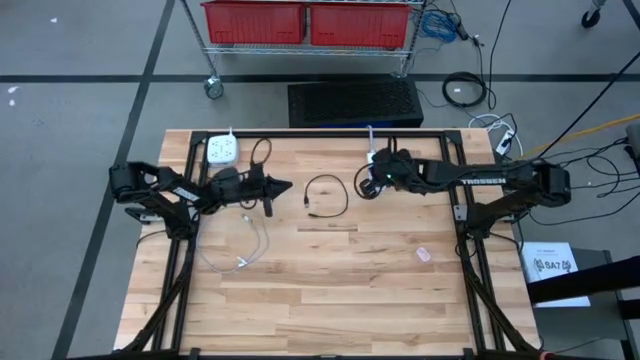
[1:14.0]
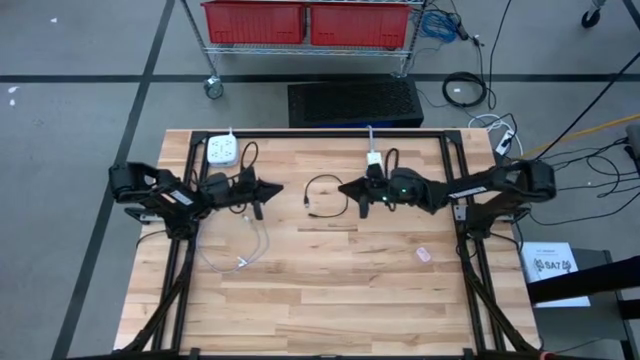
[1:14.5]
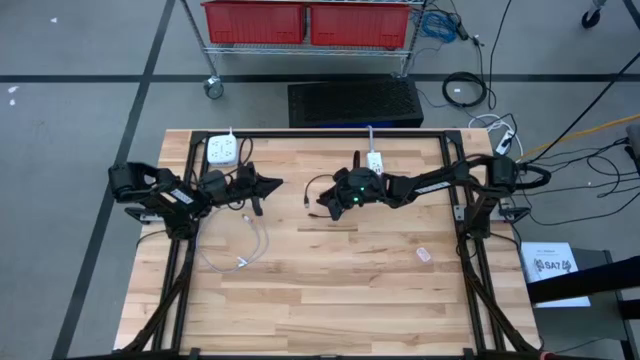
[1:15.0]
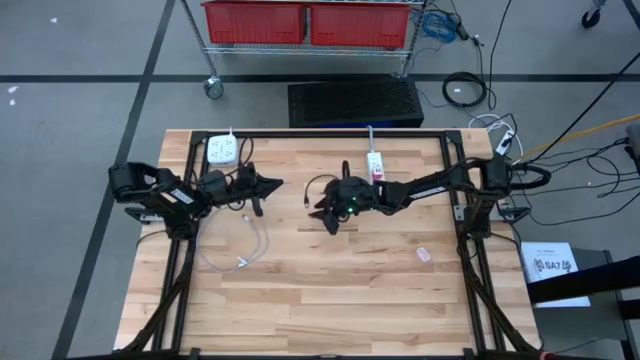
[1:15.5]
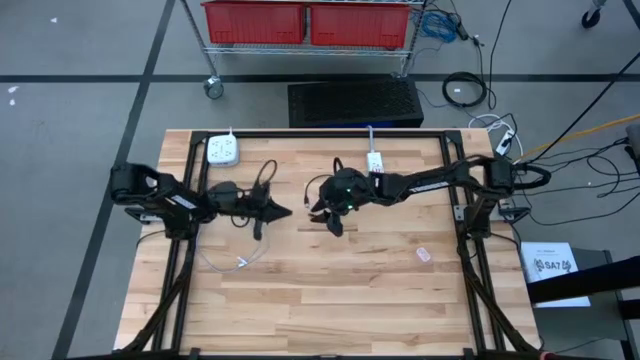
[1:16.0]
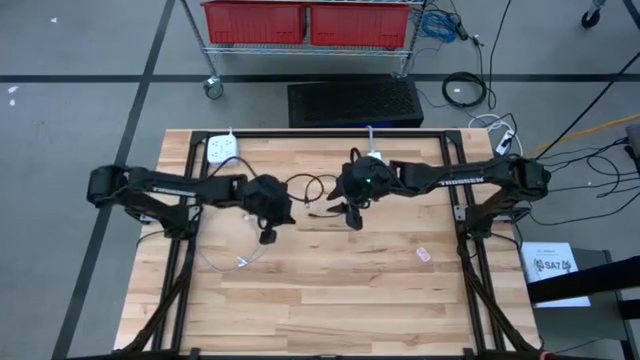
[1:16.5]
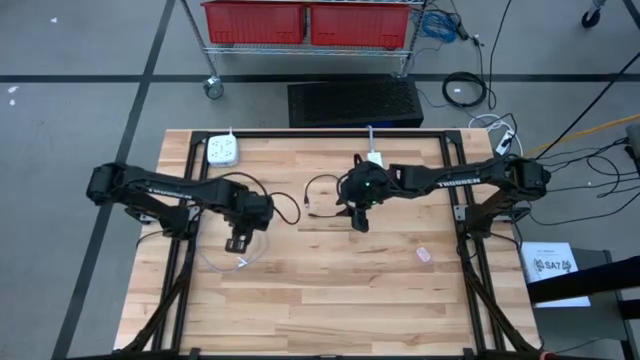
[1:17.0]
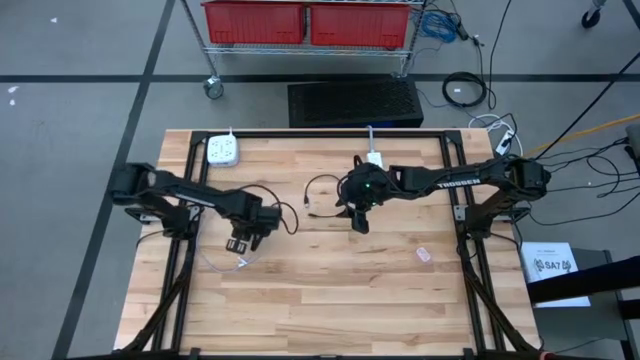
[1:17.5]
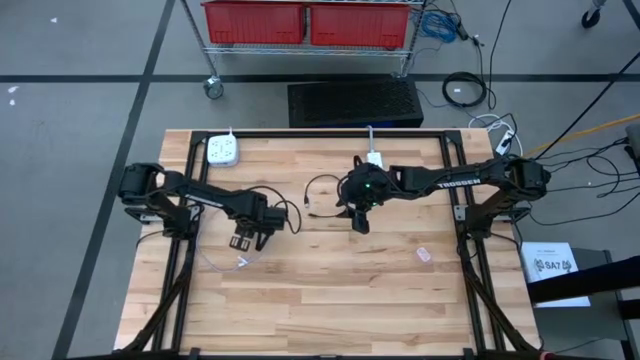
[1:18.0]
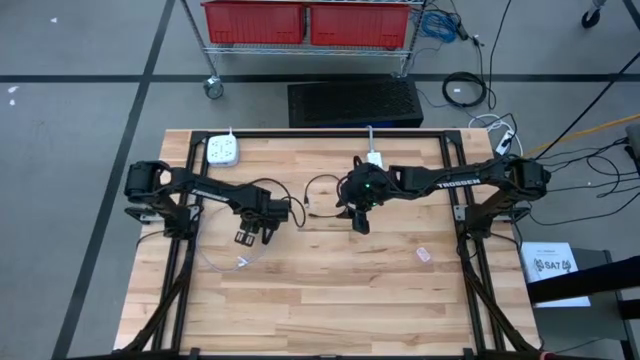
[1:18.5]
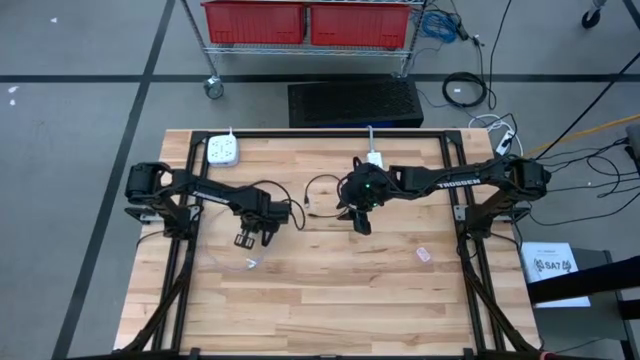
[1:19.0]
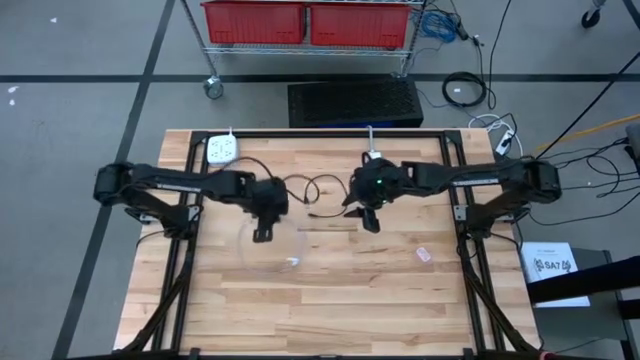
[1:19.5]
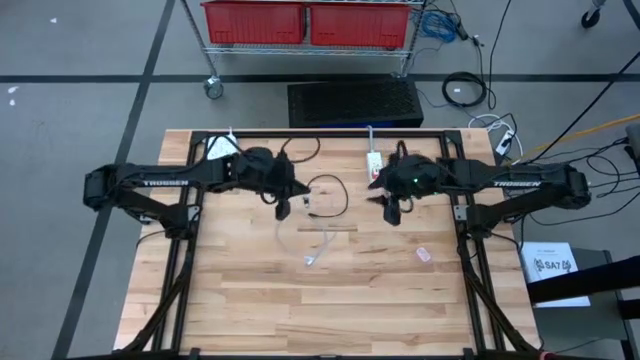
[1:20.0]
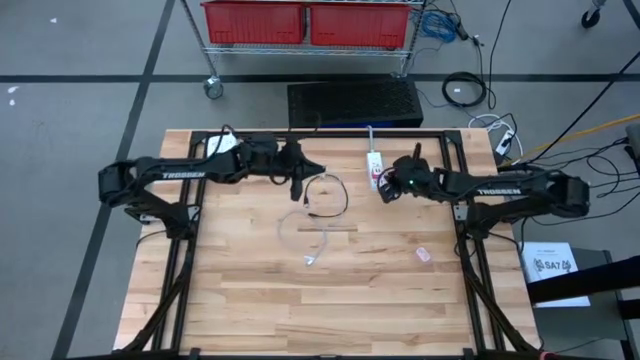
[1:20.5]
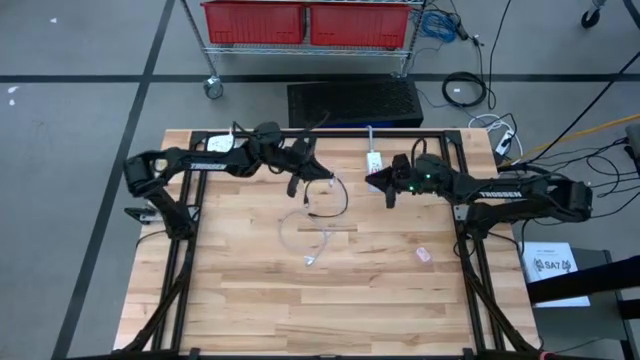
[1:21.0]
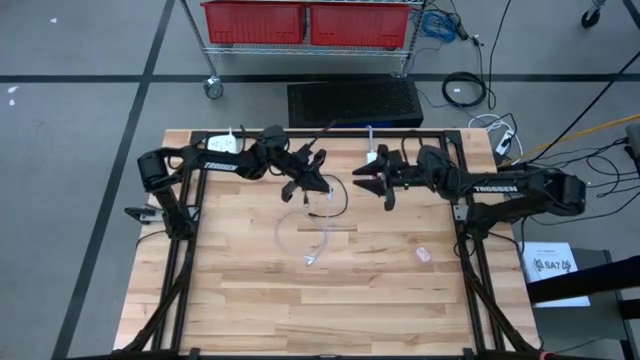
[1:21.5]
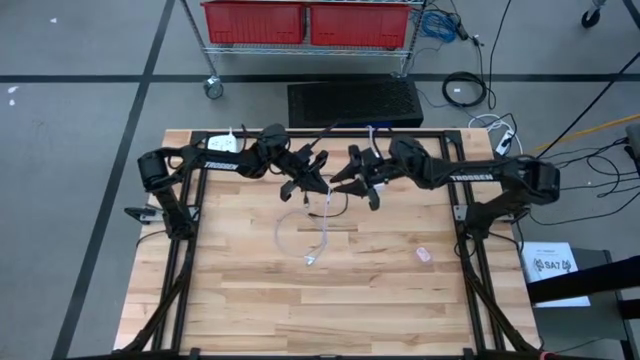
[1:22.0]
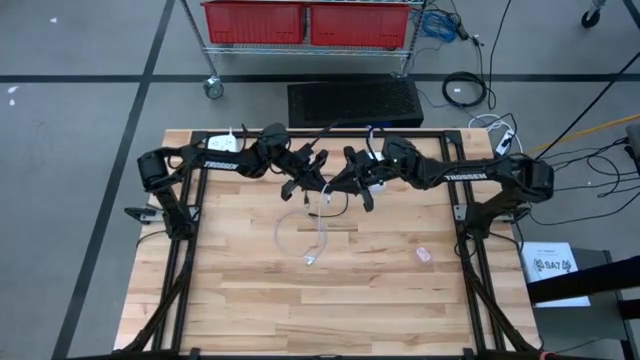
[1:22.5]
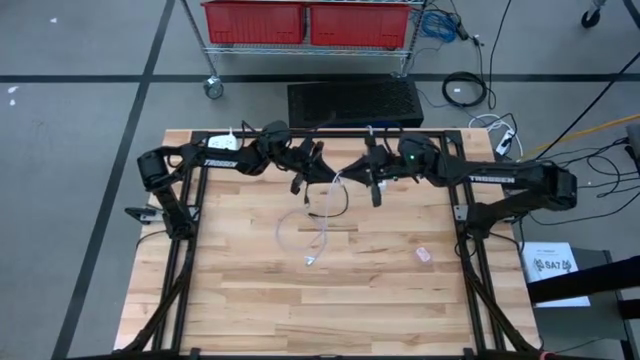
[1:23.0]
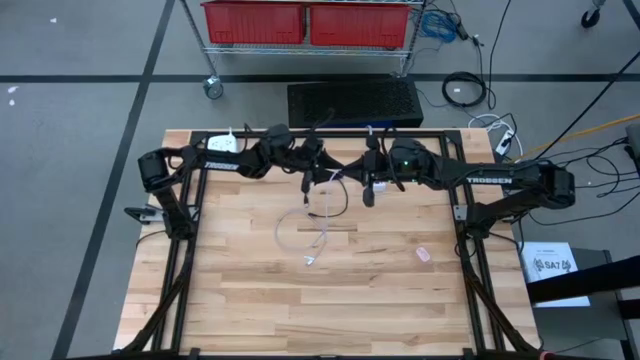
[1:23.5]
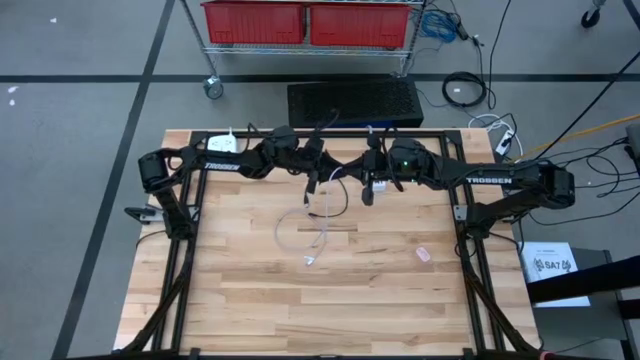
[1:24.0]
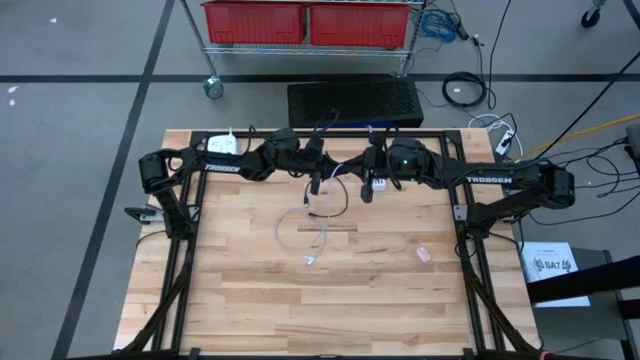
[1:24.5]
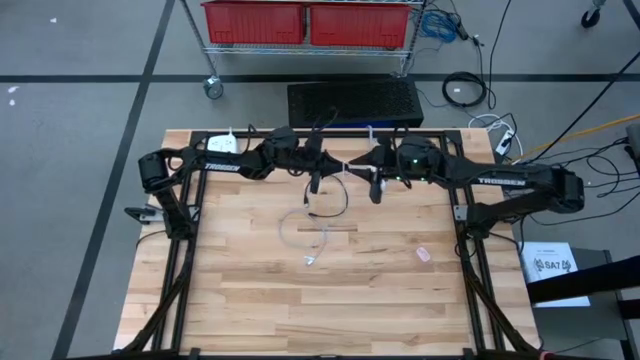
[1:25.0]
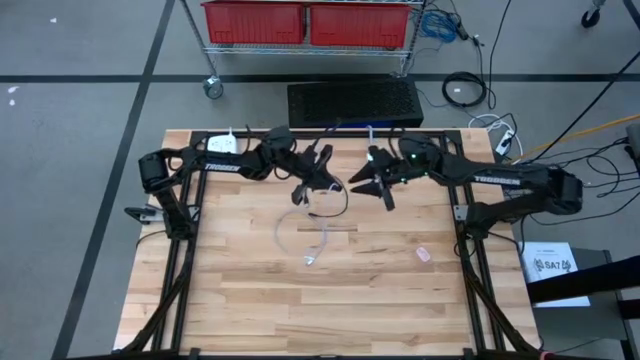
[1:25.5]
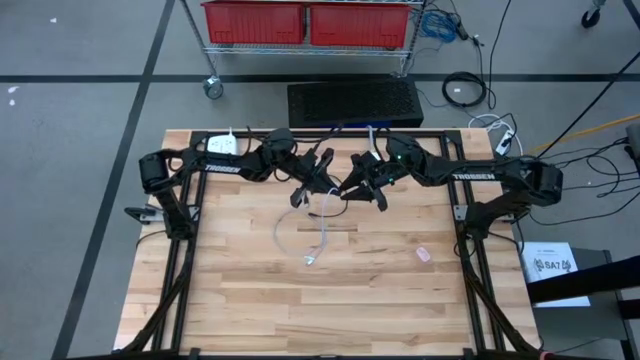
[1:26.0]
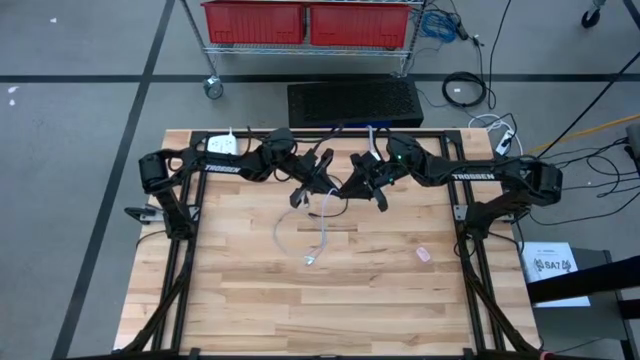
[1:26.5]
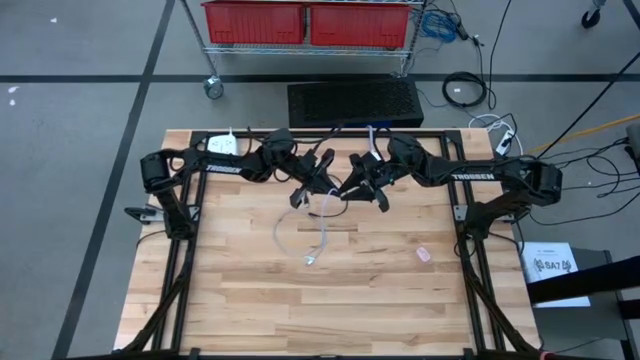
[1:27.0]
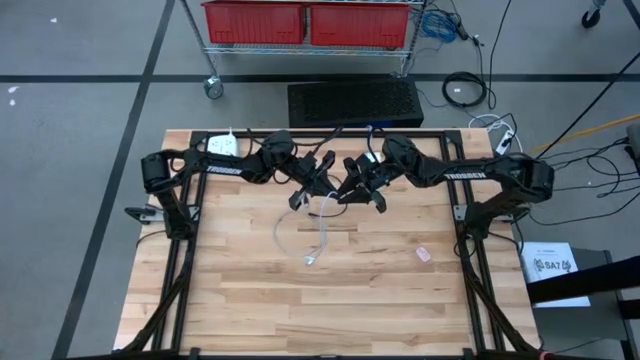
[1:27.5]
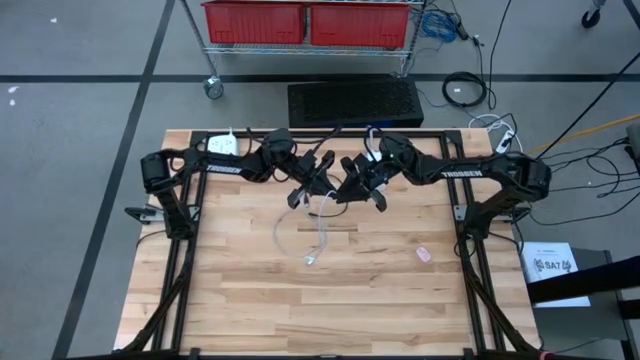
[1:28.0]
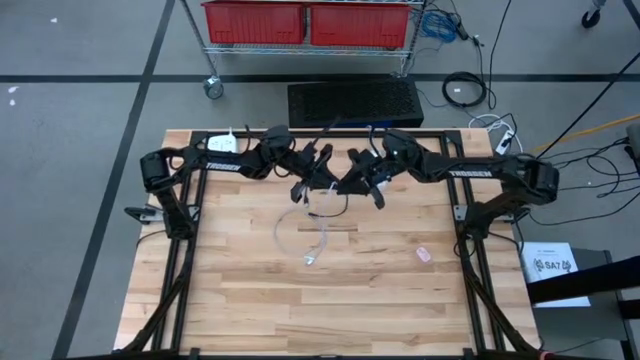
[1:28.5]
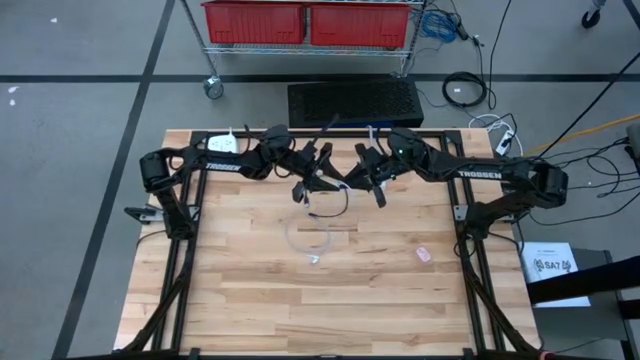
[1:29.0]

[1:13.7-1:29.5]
Task: Insert USB
Insert the purple charger cable into the red charger adapter

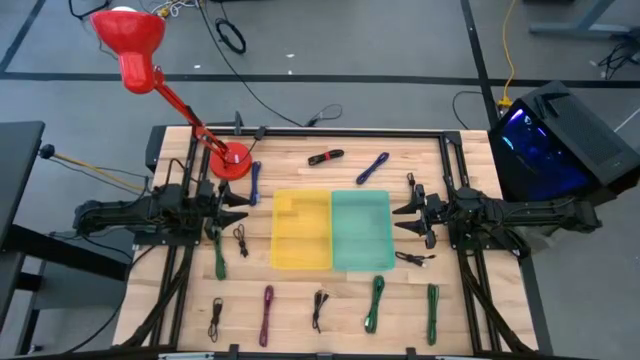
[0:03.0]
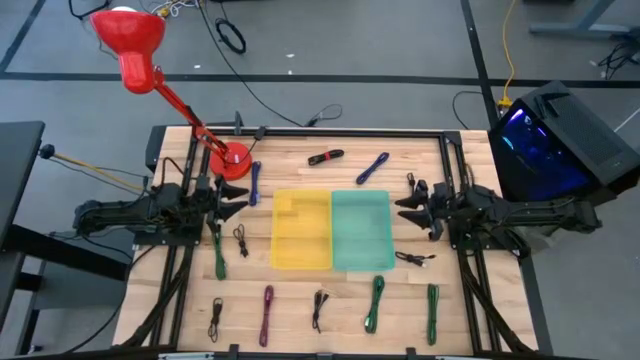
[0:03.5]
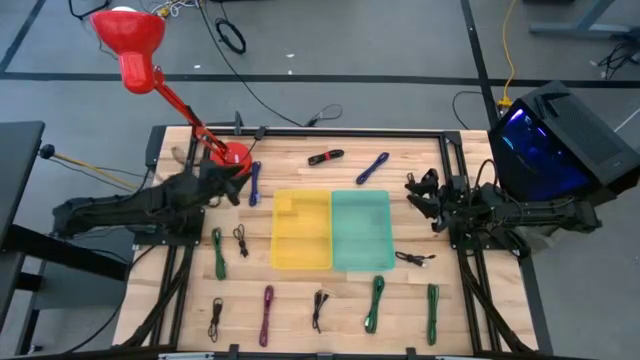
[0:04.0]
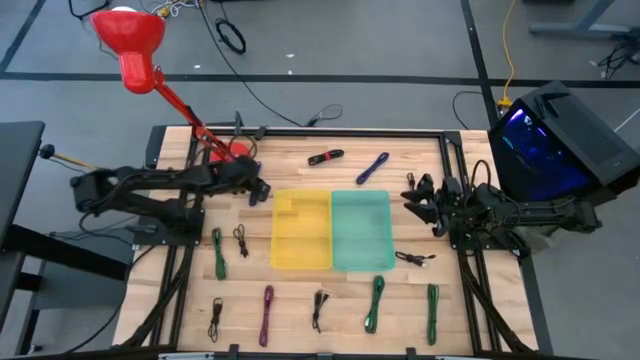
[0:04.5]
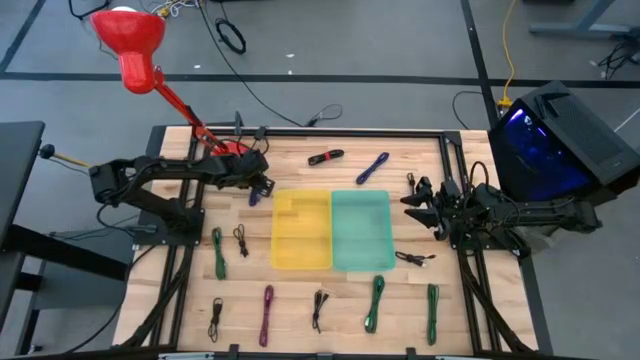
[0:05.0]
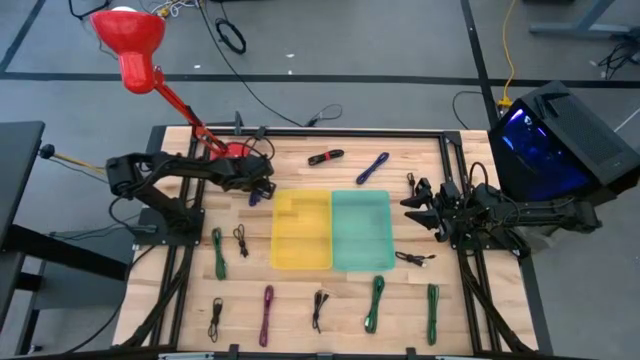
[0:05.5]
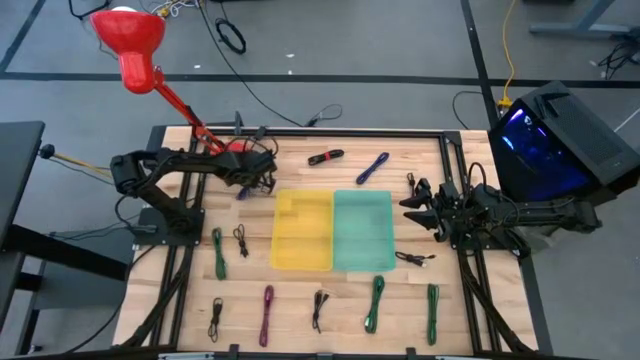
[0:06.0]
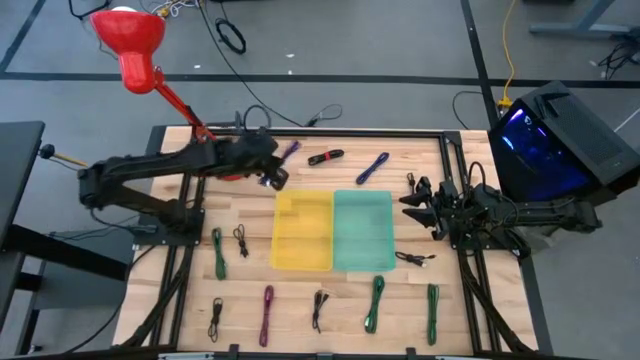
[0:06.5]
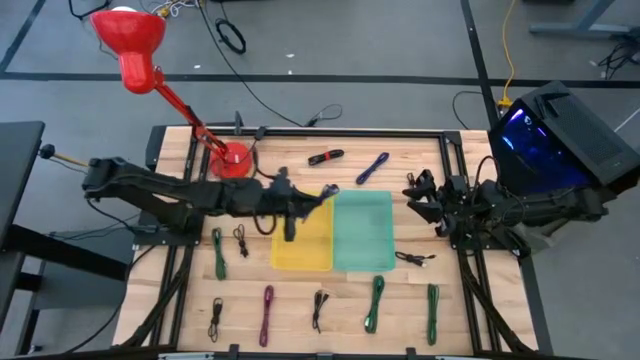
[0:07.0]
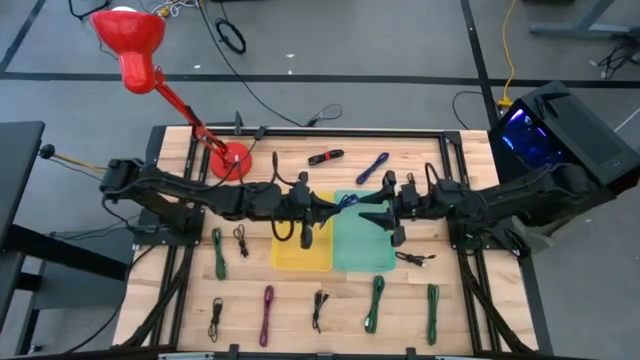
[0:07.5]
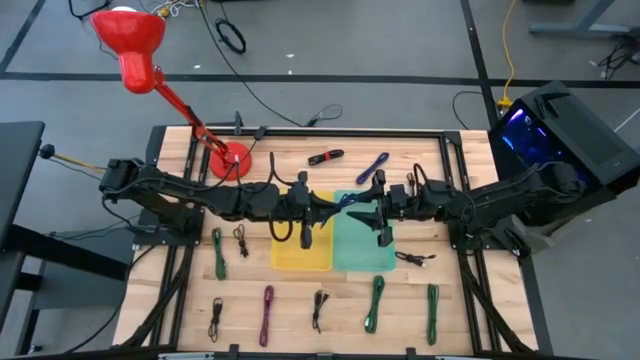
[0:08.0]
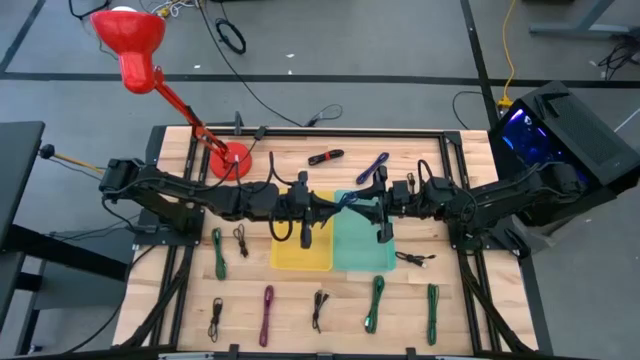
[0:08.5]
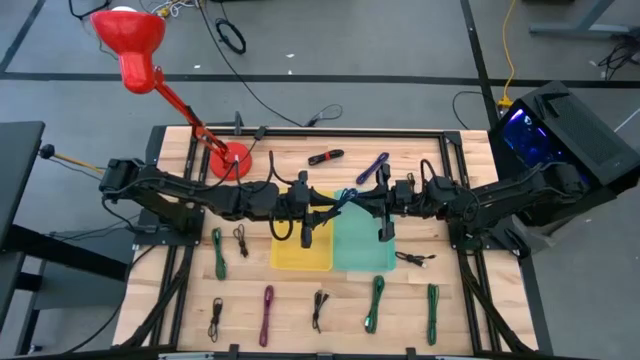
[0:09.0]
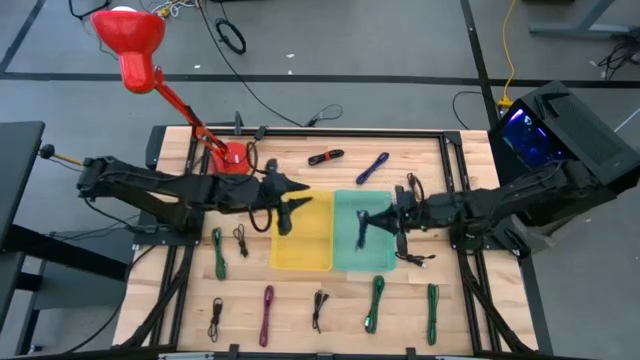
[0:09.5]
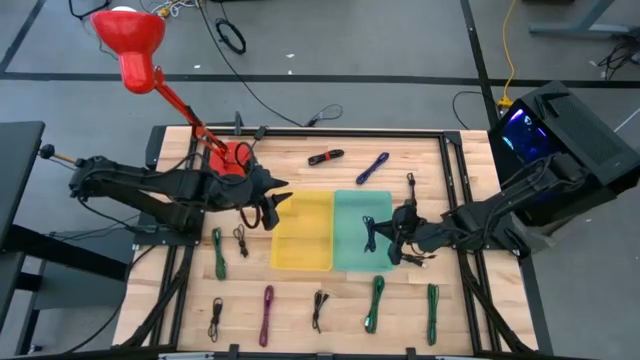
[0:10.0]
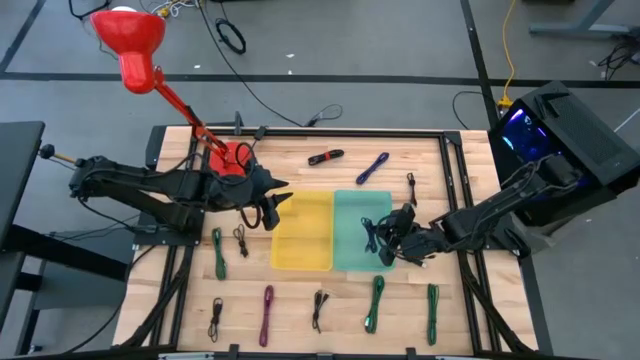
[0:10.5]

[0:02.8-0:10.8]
Task: Pick & Place USB Port
Put the left blue charger cable into the green bin
